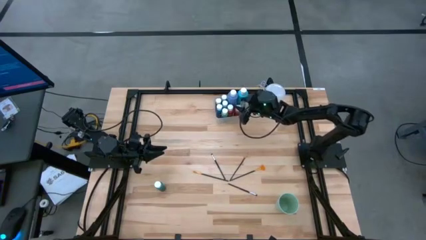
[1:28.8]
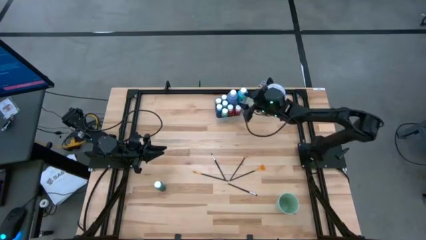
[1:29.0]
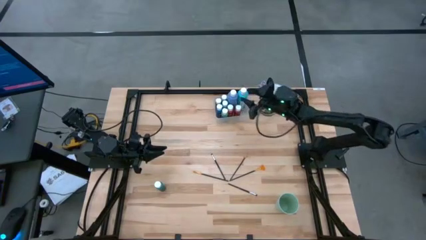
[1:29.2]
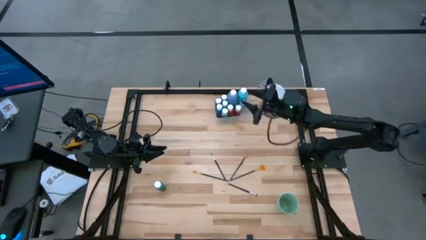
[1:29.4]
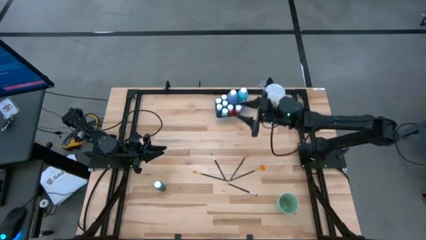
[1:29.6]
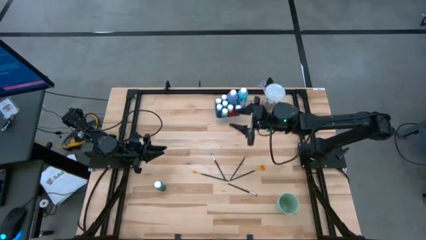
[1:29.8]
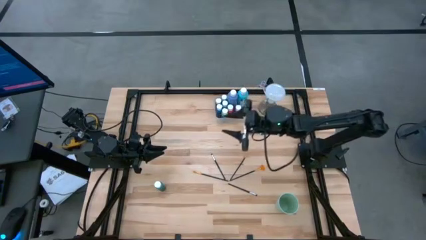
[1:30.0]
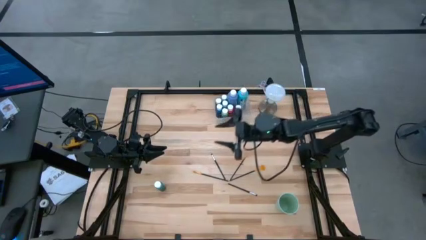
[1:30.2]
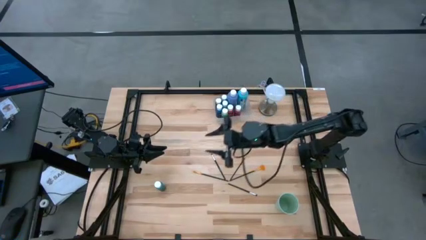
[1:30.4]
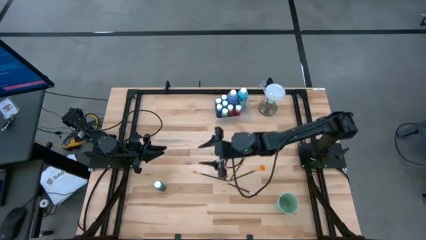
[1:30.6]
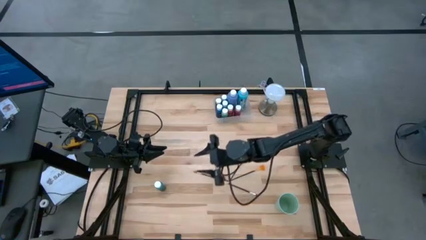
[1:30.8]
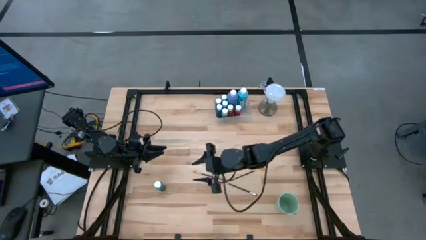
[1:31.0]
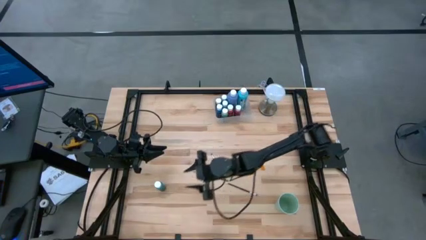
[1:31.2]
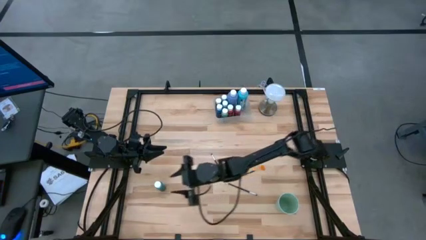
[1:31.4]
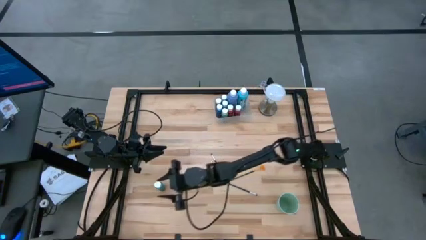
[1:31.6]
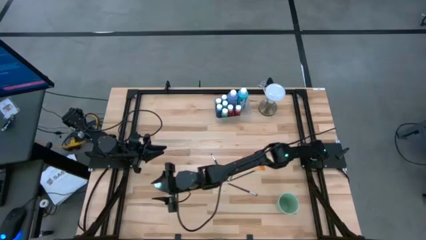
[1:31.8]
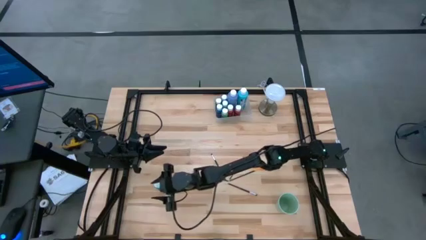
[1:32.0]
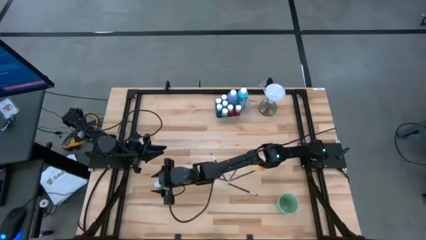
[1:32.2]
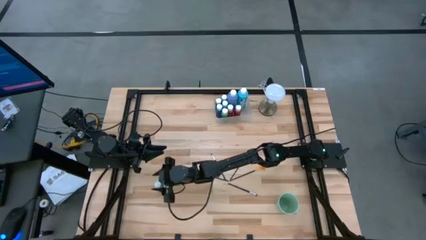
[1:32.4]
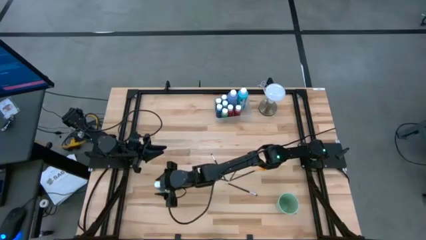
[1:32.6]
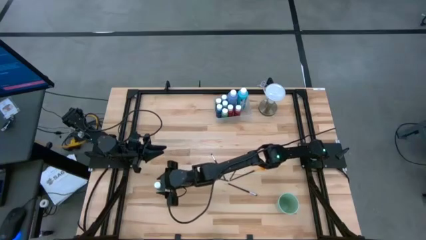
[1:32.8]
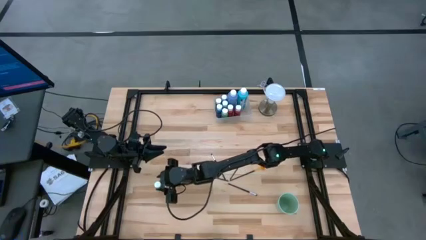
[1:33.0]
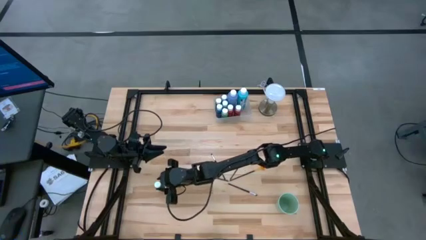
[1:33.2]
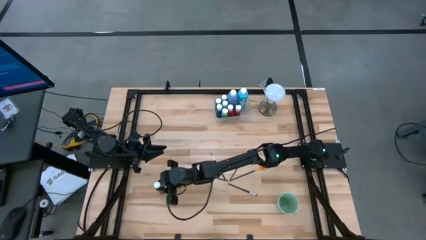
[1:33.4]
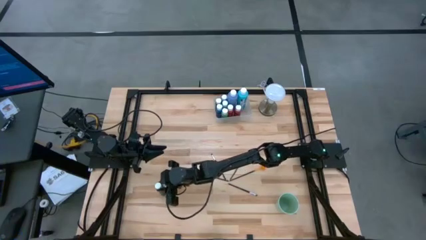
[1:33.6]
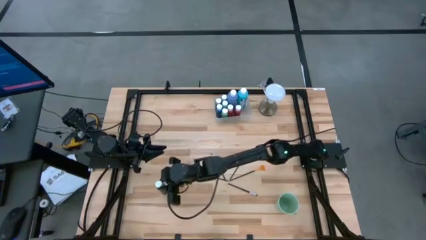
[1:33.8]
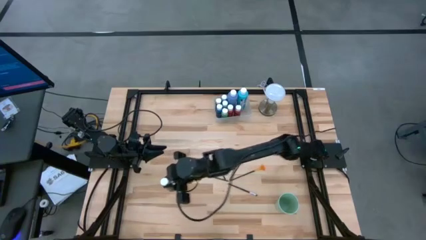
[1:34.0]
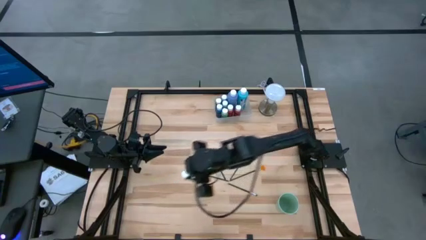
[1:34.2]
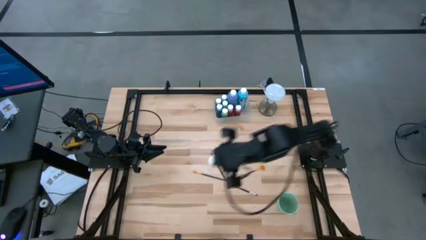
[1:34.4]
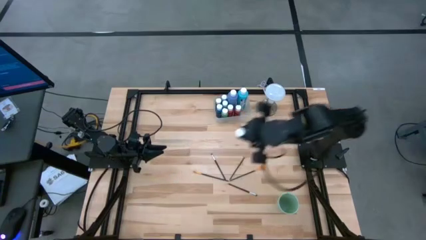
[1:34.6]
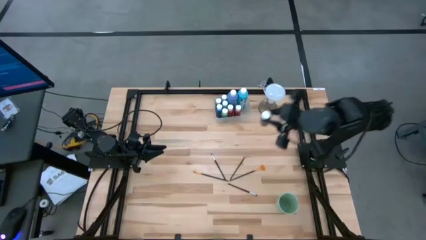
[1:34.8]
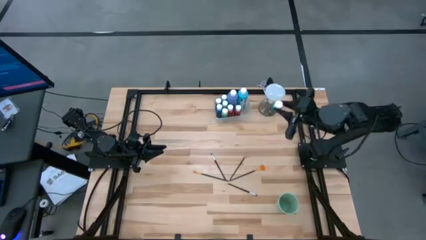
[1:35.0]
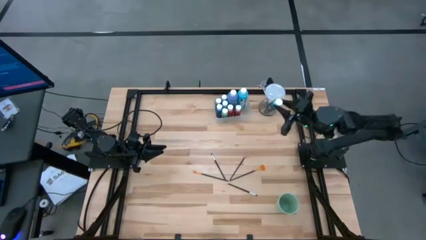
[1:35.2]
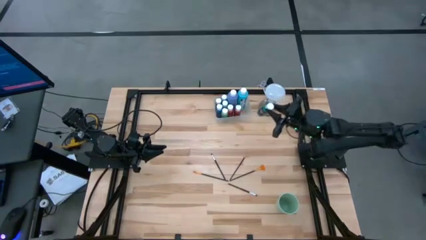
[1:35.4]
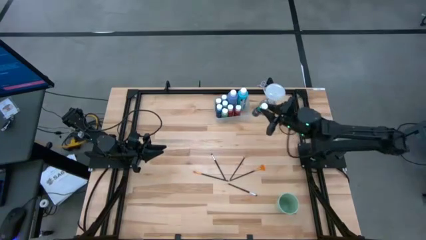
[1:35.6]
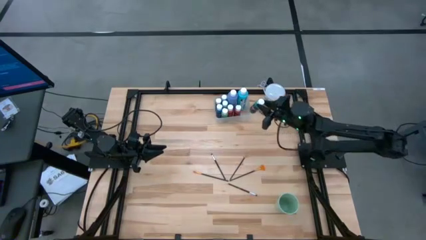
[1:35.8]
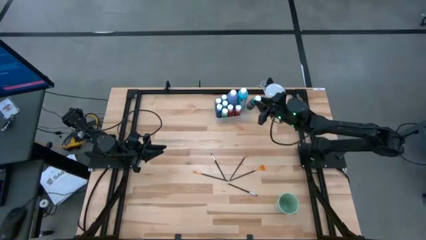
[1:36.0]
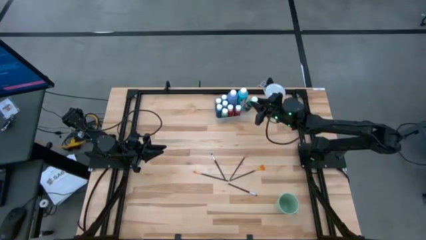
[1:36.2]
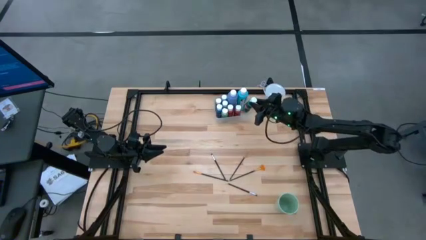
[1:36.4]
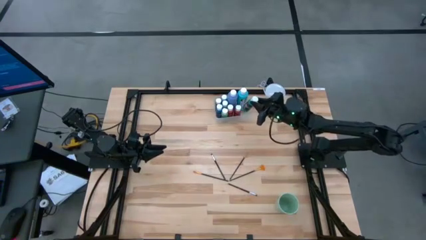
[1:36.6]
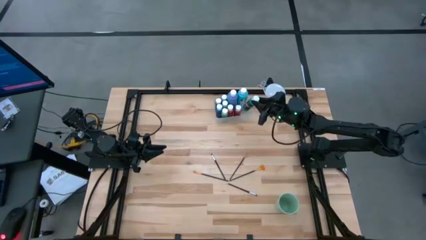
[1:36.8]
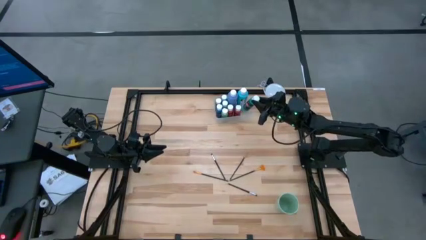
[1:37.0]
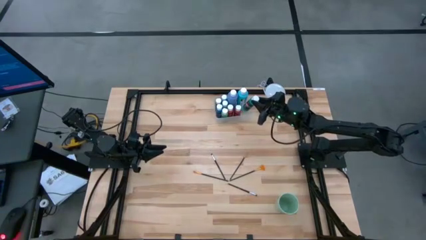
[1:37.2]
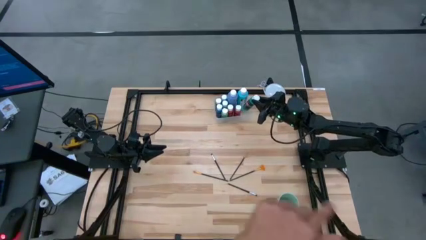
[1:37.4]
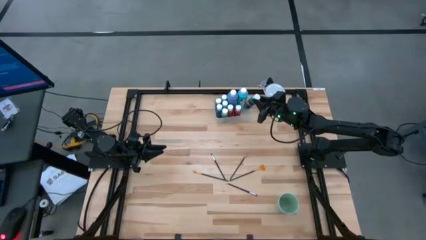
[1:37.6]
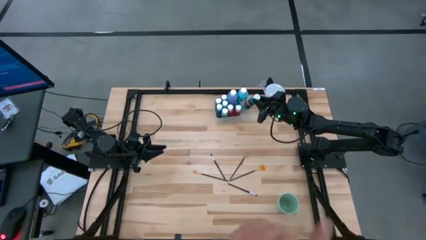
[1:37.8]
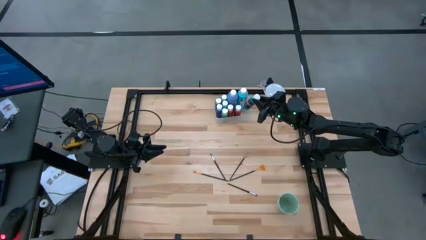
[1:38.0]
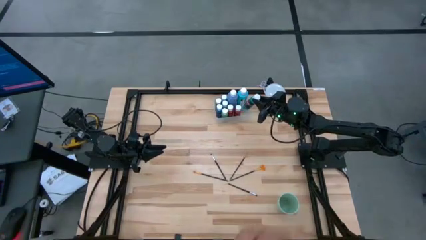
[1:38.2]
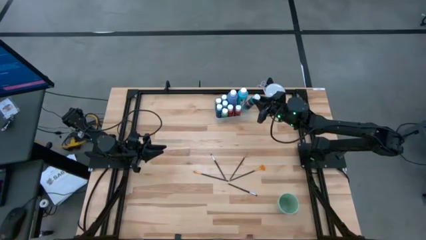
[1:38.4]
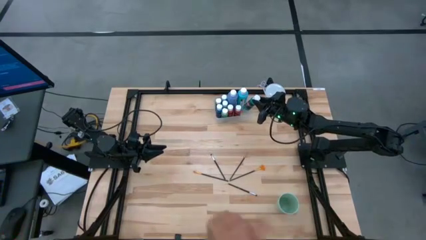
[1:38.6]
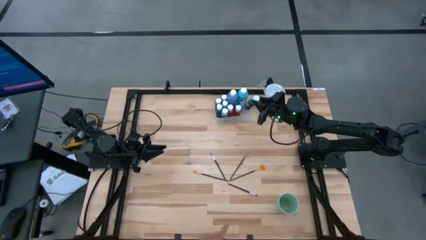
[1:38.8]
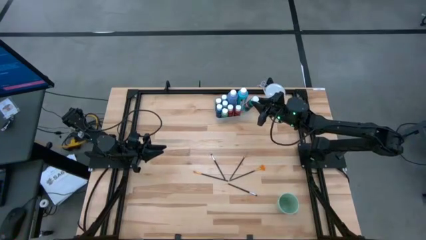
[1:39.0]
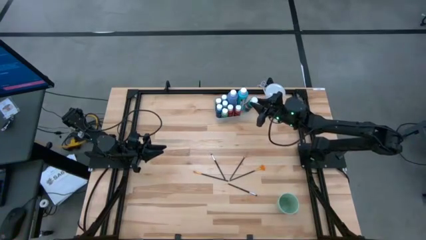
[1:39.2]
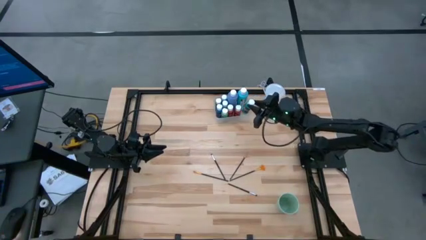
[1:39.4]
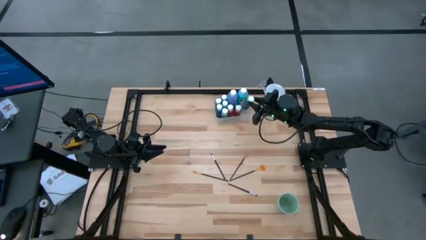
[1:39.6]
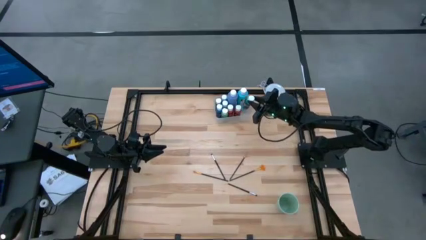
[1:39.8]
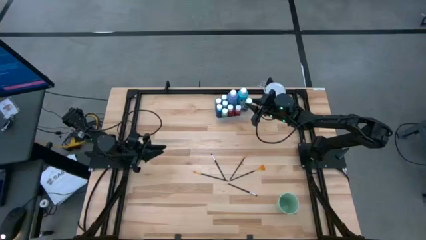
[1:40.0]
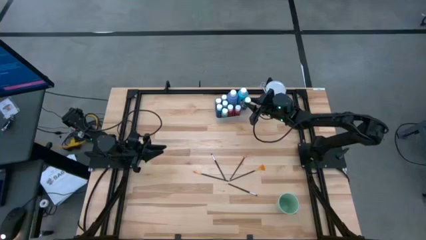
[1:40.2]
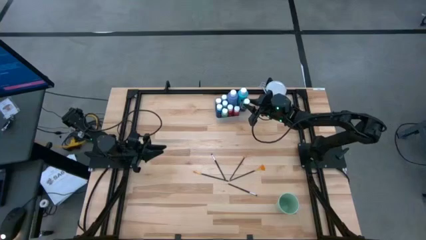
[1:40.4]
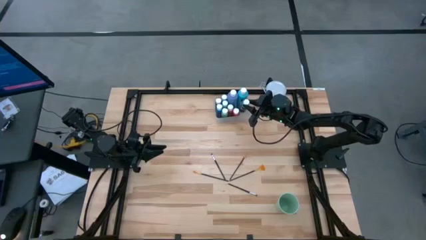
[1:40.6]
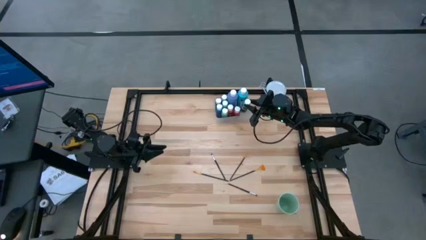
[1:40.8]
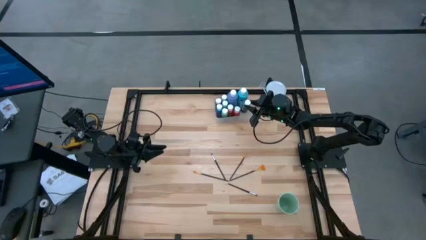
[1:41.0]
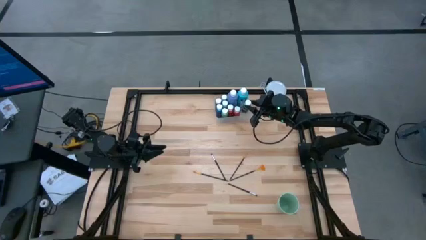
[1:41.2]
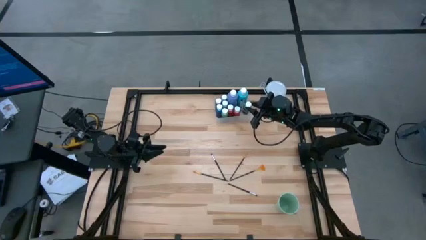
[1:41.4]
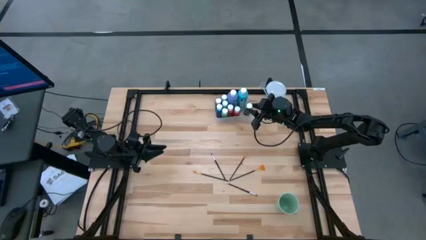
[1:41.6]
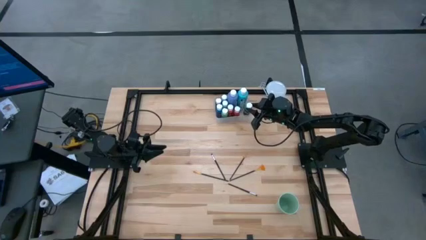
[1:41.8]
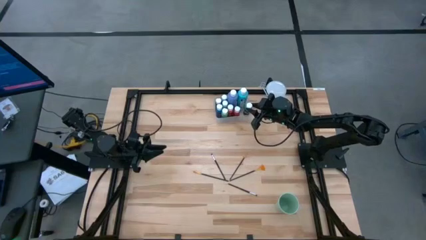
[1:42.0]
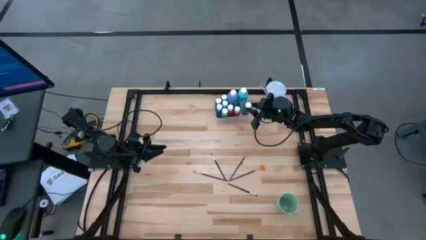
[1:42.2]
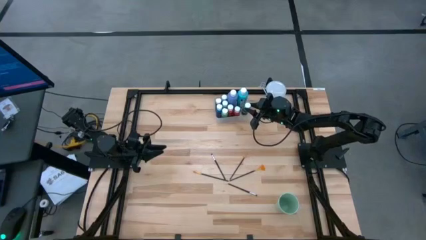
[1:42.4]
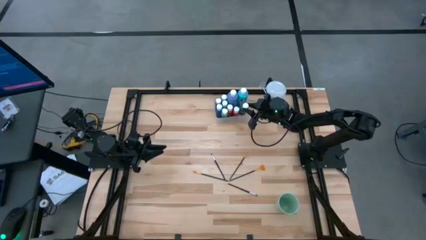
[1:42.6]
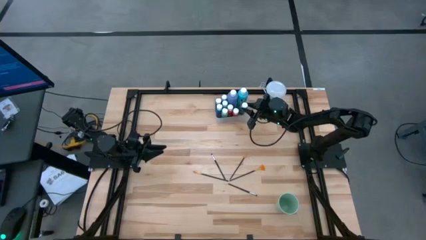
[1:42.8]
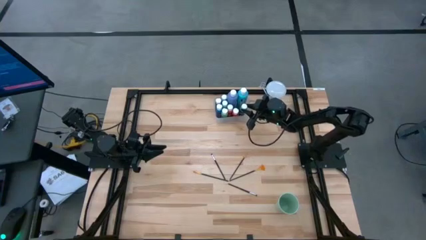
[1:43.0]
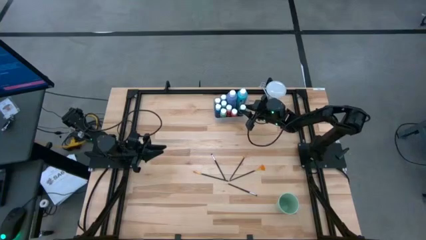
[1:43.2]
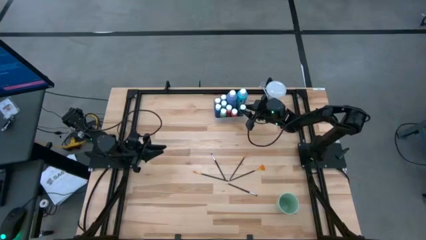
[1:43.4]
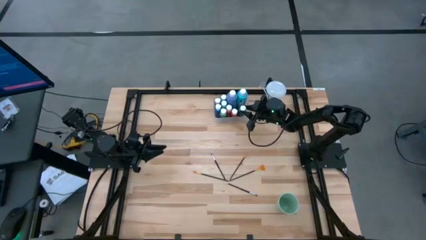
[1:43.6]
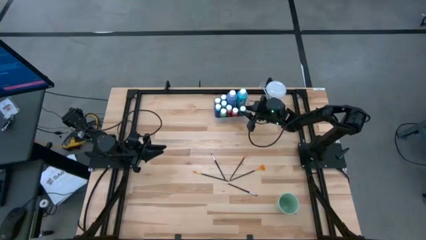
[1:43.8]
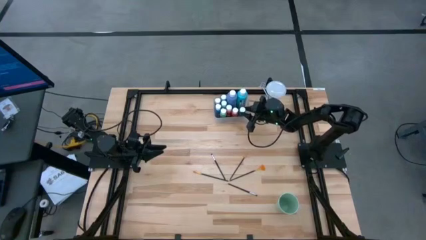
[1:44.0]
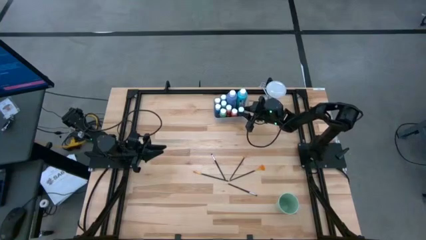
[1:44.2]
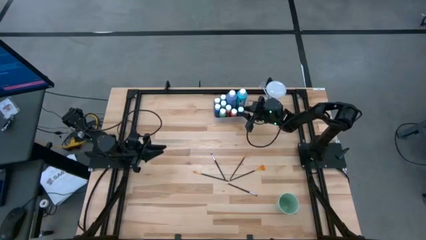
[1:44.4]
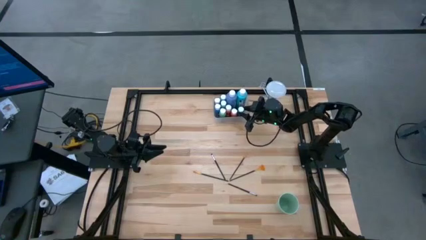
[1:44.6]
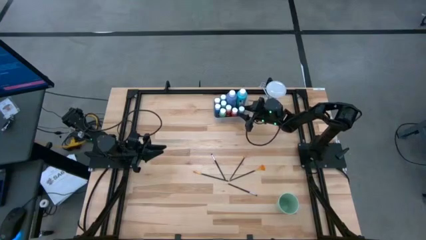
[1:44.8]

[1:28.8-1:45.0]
Task: Pick & Place Paint Supplies
Put the dark green paint bottle into the transparent bin
